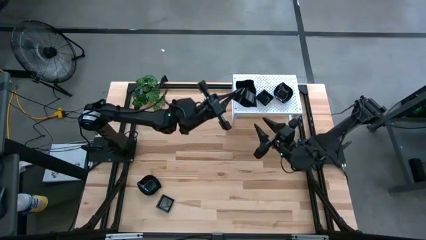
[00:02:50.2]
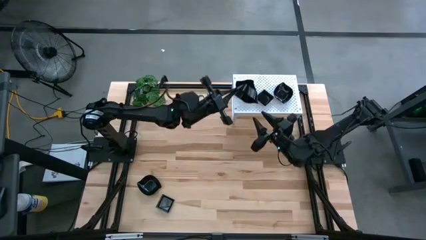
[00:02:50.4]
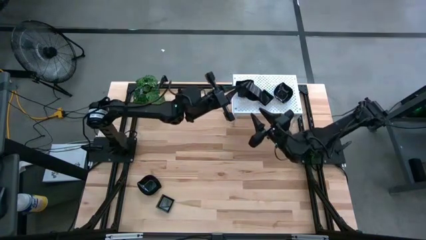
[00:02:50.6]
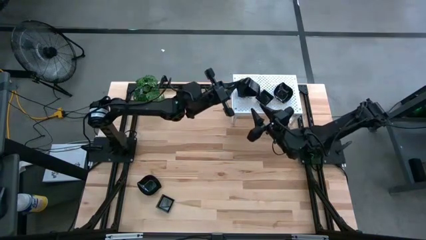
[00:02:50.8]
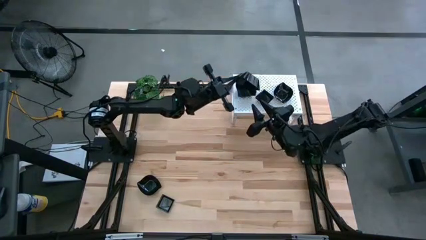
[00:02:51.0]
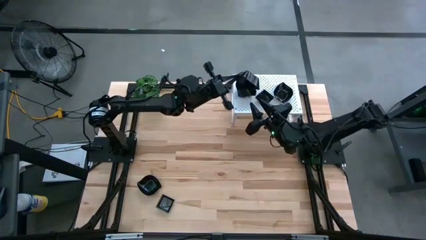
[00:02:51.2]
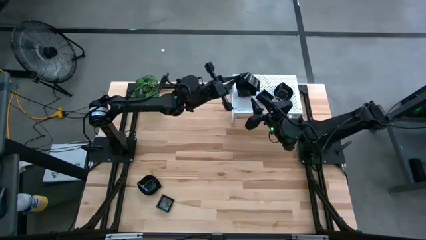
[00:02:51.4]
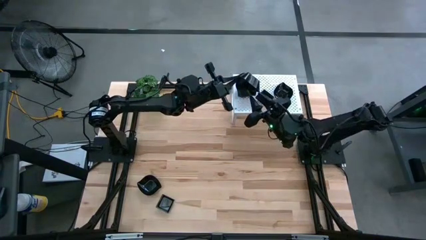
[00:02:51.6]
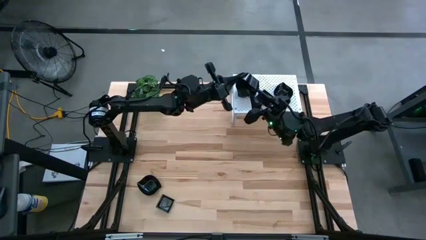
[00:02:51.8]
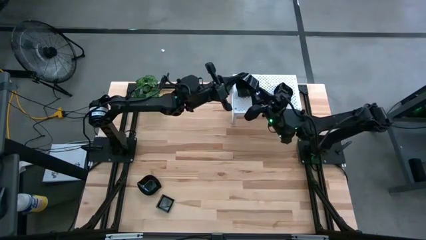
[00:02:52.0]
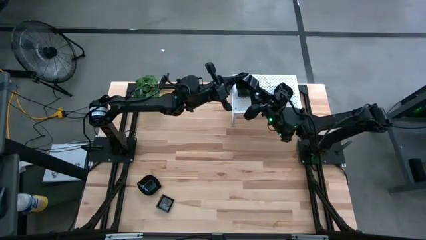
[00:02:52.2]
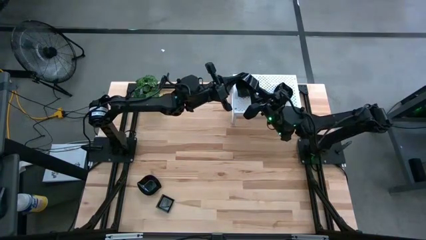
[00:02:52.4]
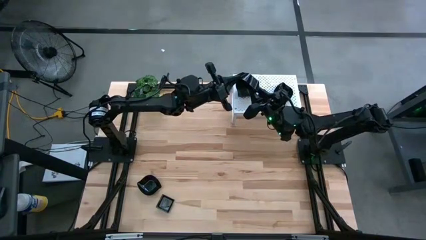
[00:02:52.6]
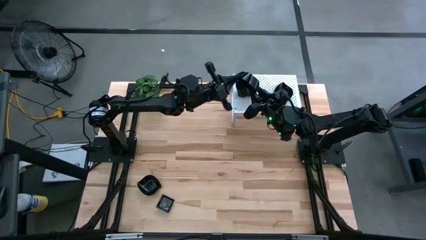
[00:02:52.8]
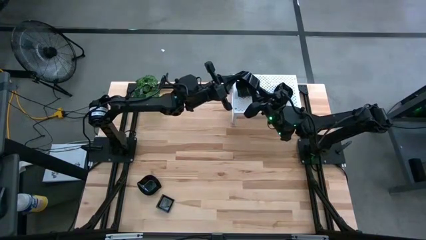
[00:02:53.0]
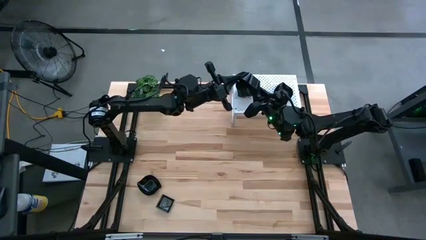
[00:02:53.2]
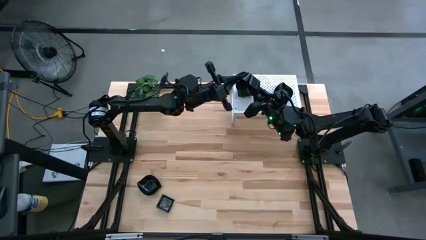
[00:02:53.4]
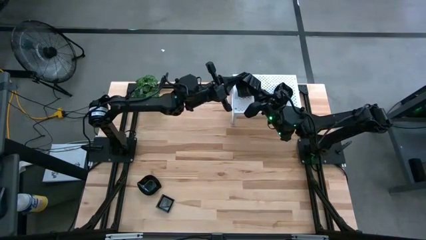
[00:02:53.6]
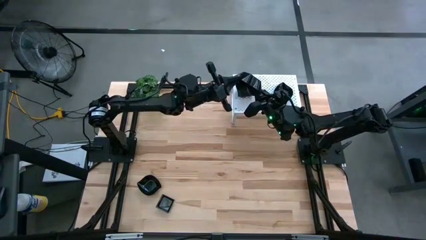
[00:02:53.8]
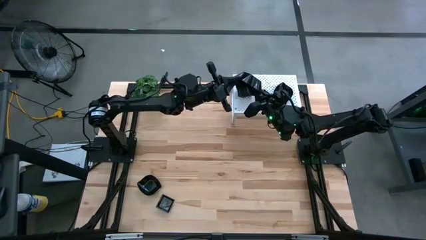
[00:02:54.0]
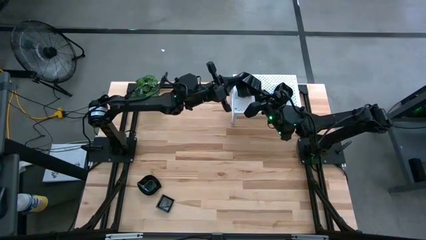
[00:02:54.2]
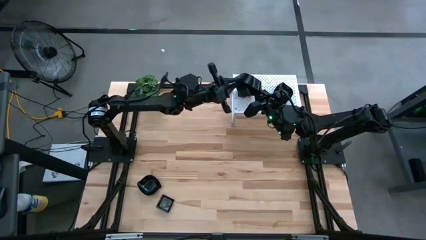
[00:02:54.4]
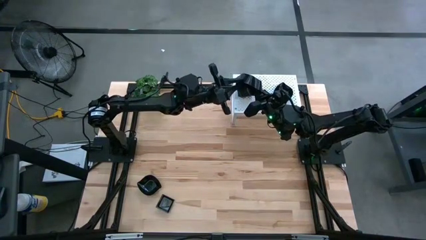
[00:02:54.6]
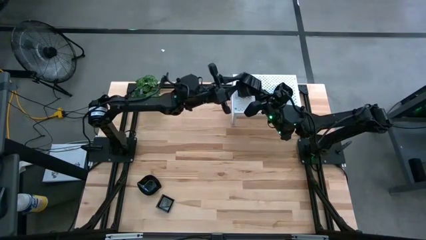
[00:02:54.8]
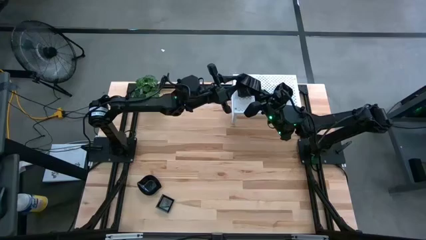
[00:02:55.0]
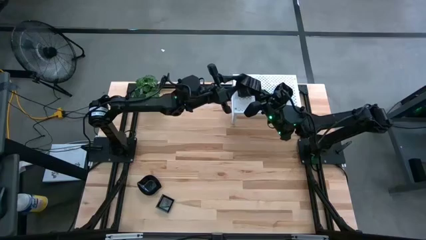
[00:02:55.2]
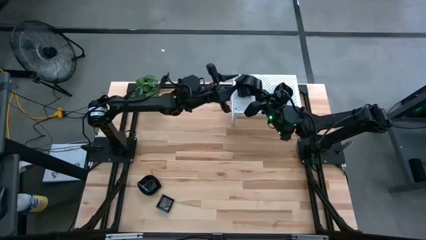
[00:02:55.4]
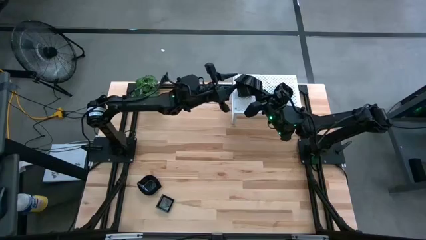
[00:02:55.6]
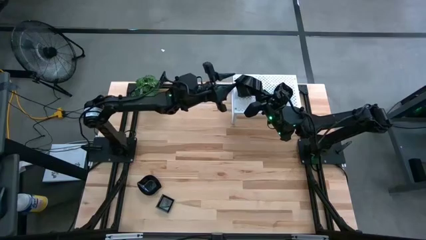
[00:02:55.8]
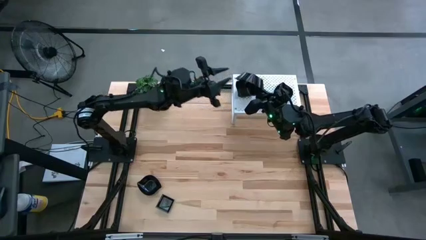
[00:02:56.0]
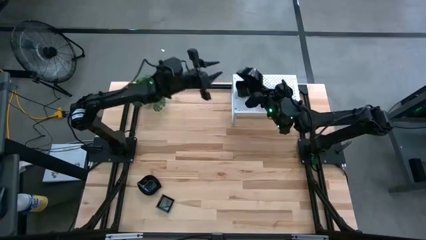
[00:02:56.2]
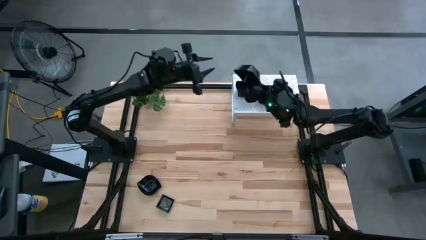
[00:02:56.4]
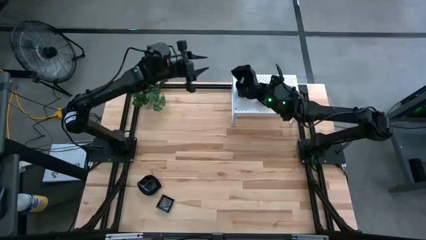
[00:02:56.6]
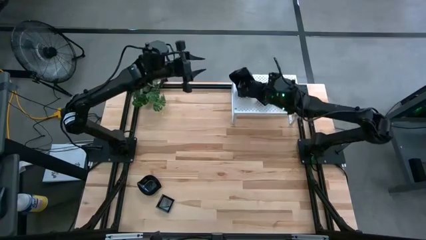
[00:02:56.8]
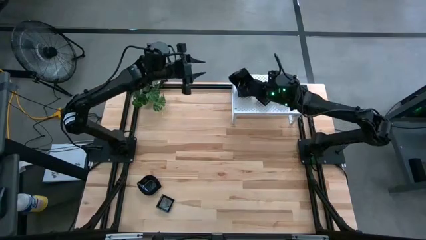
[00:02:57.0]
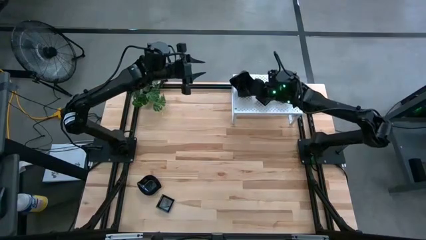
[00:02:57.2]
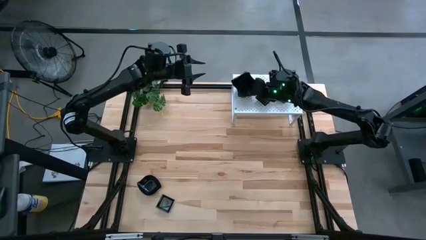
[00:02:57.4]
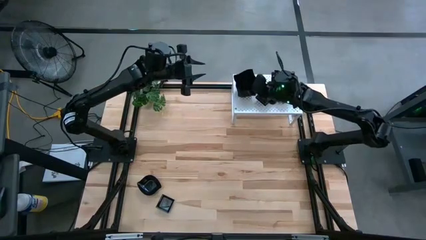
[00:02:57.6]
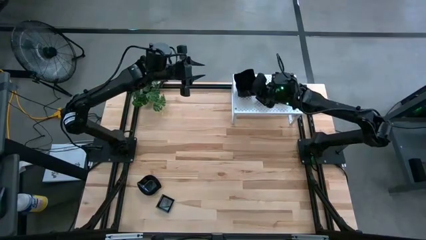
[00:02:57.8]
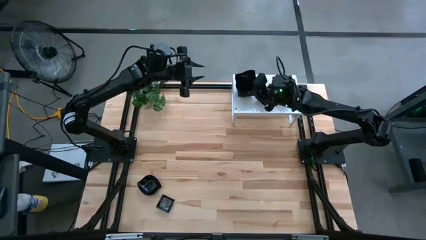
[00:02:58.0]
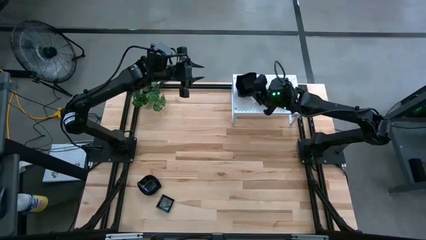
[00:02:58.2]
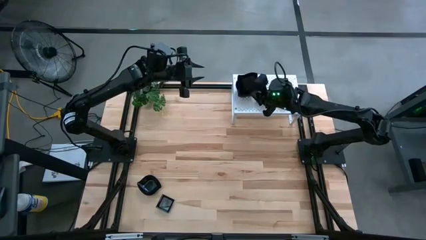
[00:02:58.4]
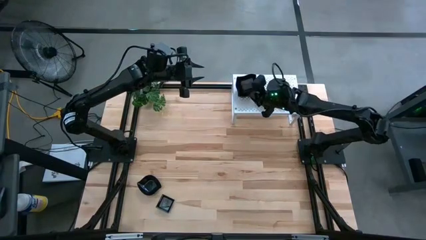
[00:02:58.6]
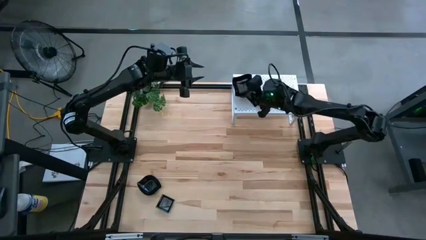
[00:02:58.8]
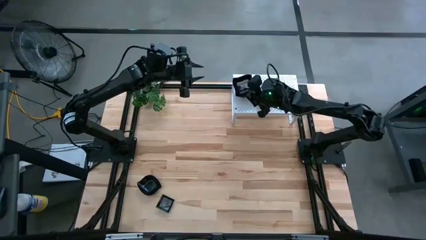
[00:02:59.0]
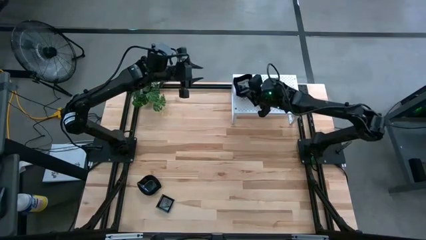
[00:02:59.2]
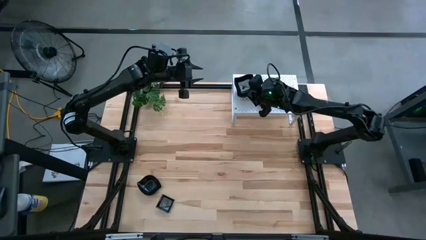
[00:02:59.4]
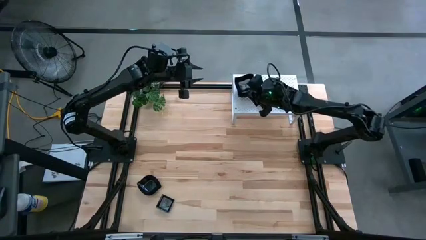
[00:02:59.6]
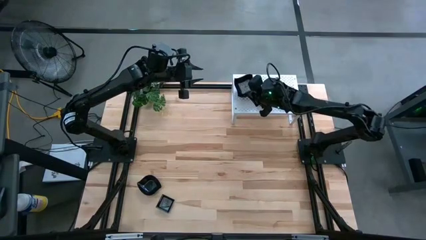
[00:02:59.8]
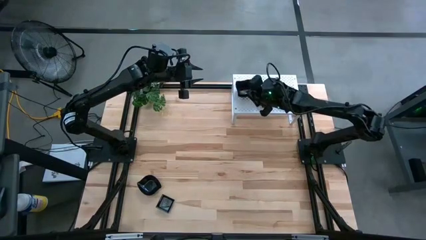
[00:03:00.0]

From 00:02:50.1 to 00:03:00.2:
Task: Pick & Place Mini shaped plates
Stack the distorted square plate on top of the distorted square plate on the shelf

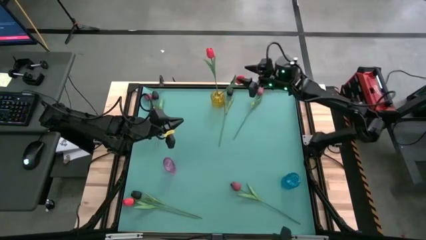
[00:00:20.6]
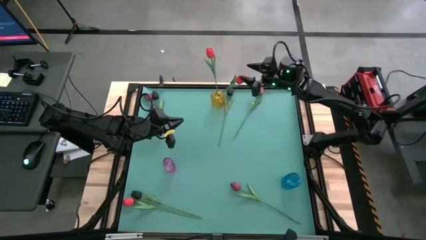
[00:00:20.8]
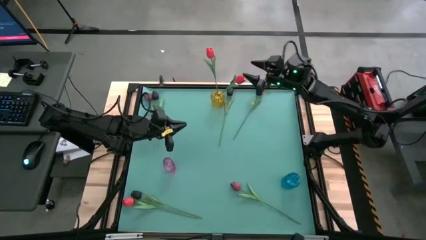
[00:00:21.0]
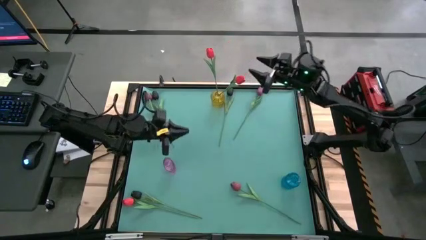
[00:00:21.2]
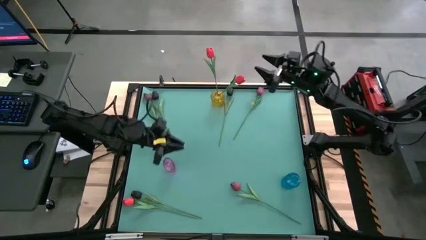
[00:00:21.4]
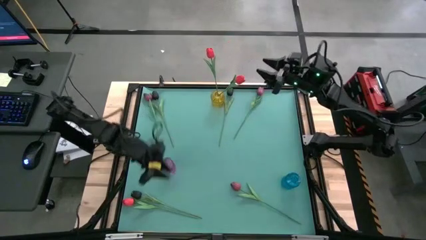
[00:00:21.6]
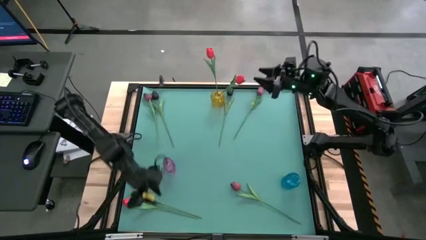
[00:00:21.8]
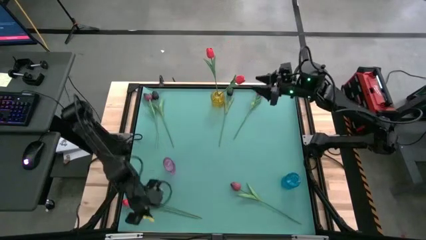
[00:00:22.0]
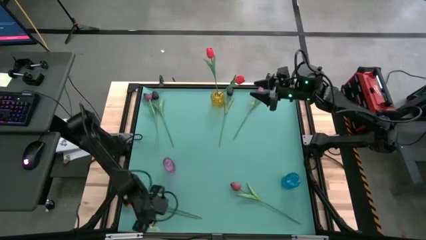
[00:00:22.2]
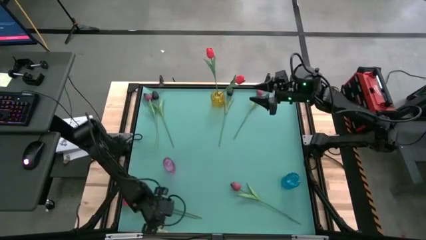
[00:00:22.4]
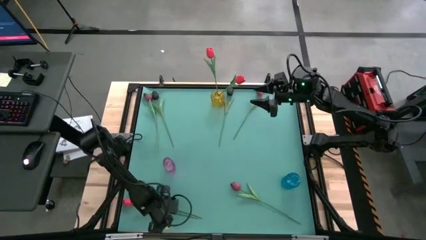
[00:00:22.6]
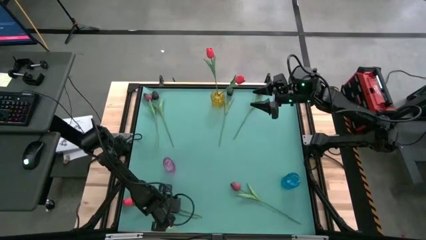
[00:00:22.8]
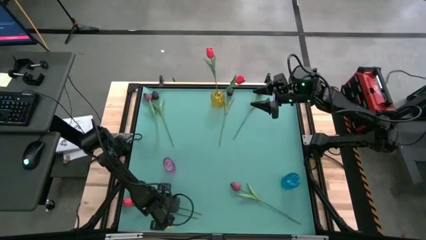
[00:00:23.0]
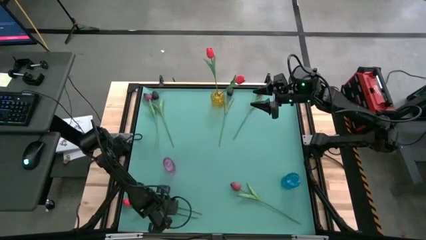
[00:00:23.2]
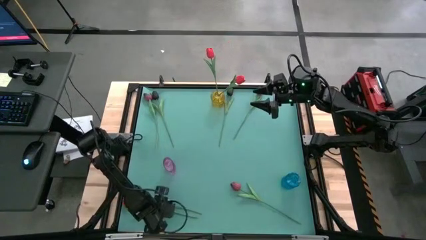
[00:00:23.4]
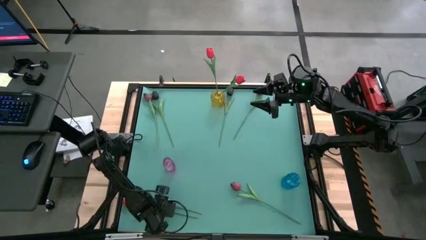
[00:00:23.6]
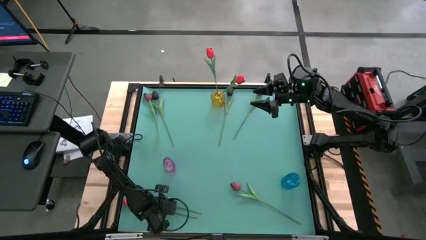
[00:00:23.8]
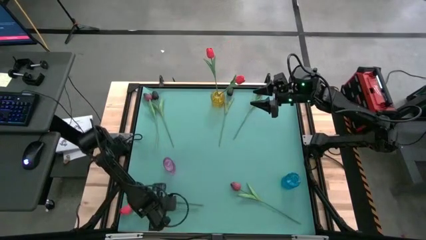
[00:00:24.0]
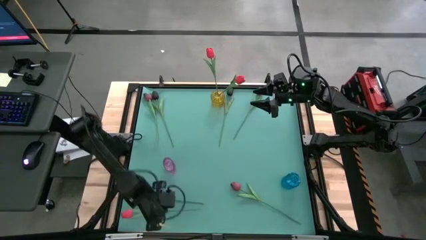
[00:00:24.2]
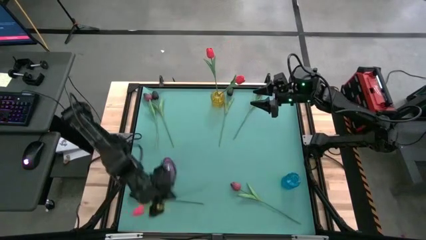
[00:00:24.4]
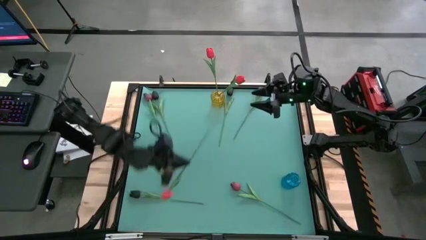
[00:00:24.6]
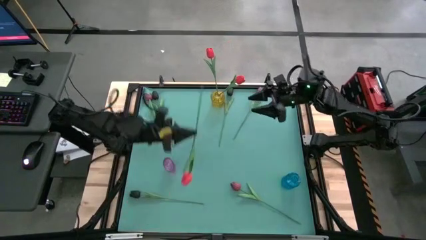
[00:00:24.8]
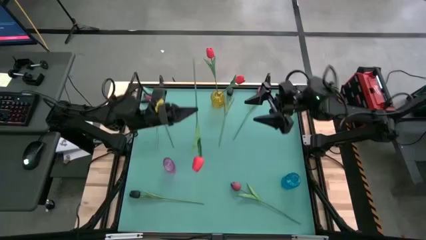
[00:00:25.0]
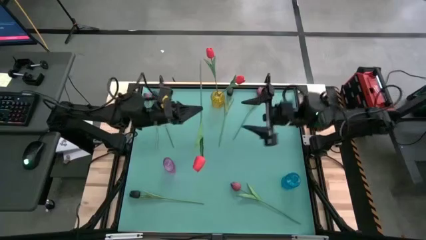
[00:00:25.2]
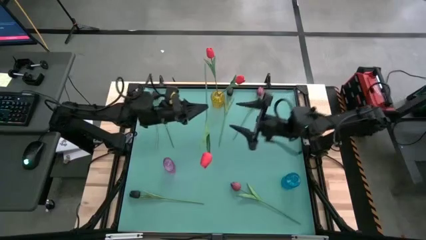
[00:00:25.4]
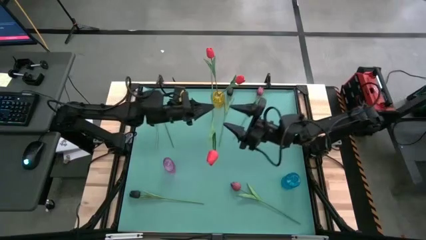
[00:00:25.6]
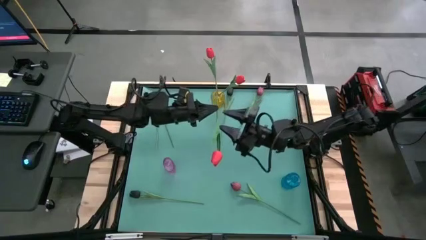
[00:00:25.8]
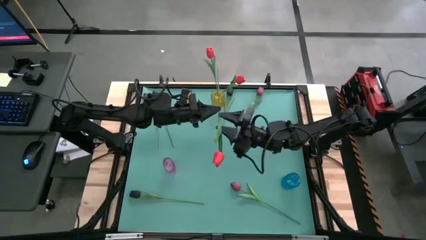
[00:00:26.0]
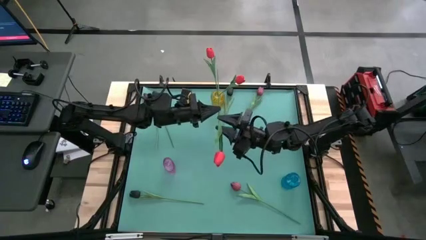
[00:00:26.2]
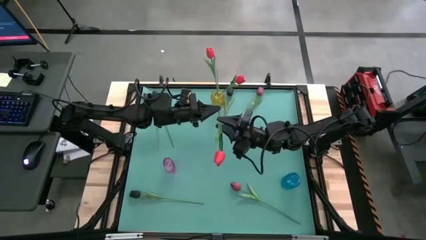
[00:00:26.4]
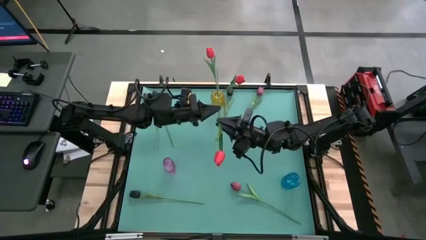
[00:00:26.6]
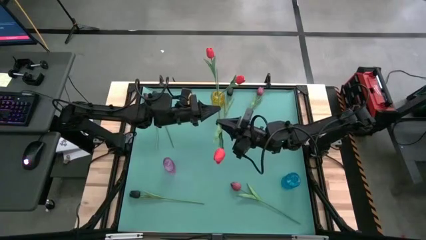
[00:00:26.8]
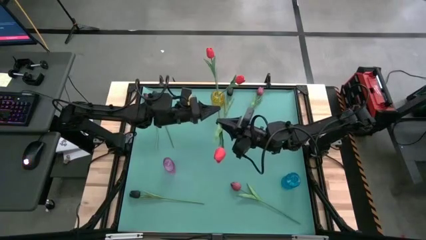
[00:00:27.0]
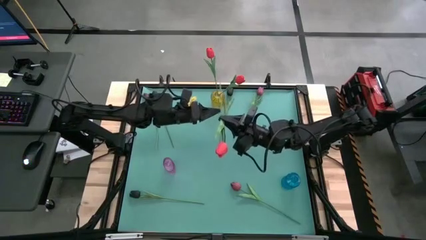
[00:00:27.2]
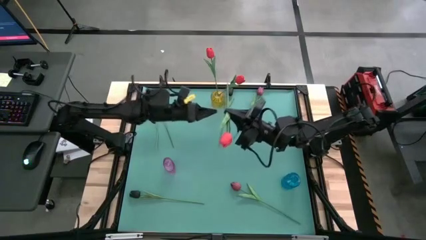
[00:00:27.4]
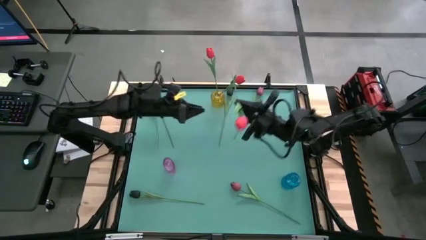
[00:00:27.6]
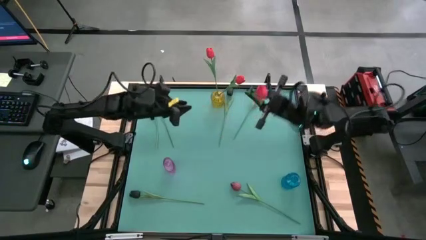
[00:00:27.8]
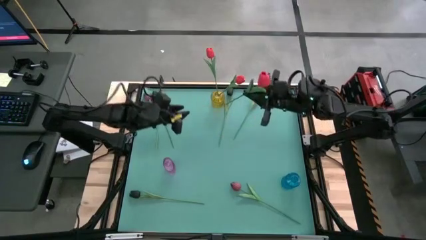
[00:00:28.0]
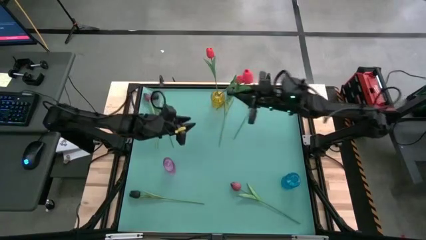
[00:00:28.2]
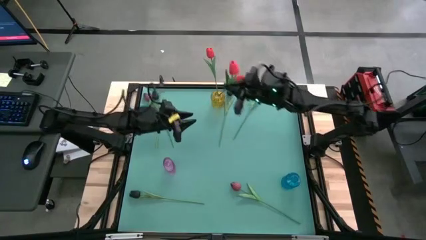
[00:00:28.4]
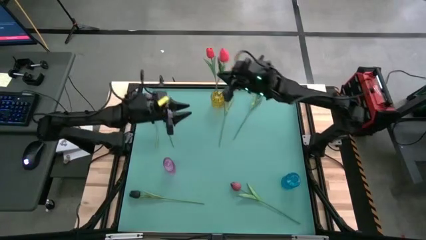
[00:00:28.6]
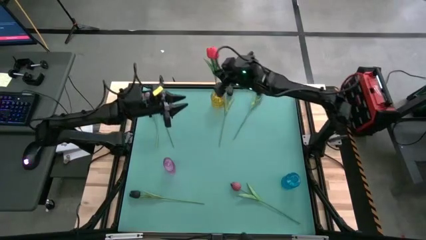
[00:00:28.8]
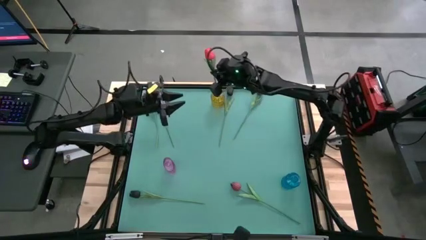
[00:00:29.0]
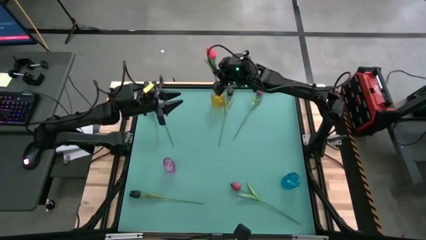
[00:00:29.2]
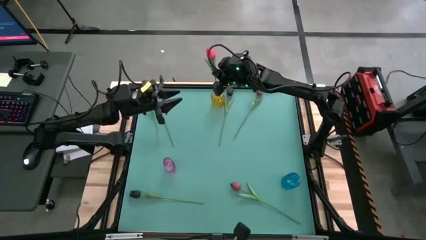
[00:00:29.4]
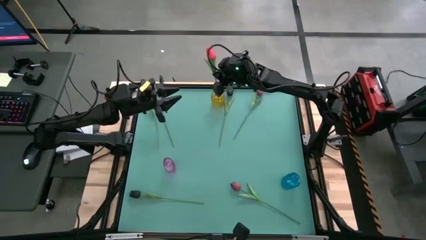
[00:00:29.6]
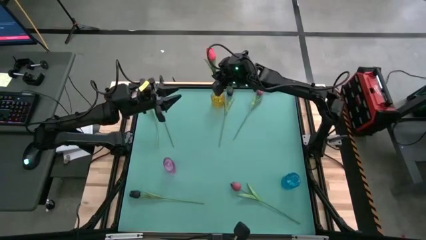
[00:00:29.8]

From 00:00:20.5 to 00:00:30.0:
Task: Sort flowers into vase by color
Put the red tulip into the yellow vase
